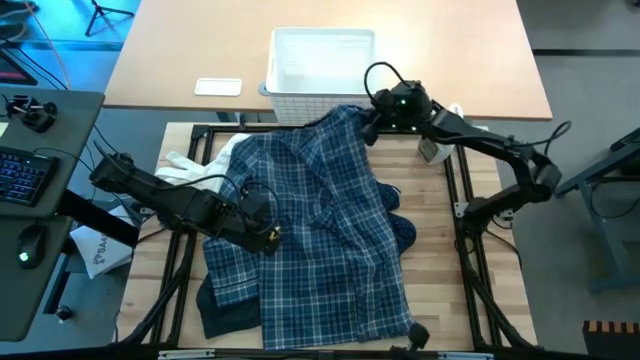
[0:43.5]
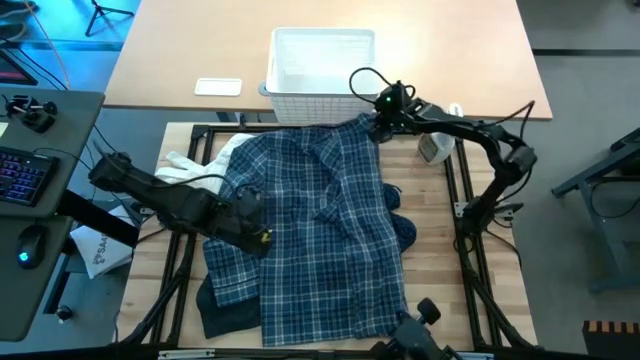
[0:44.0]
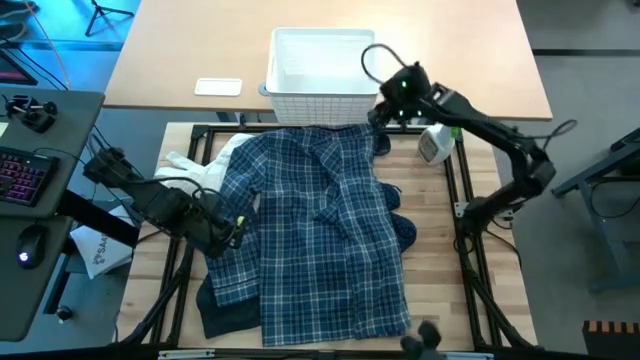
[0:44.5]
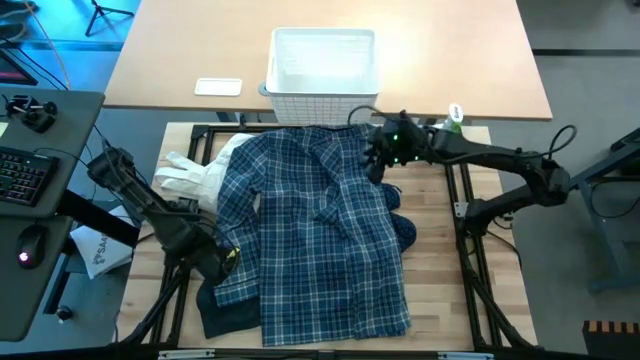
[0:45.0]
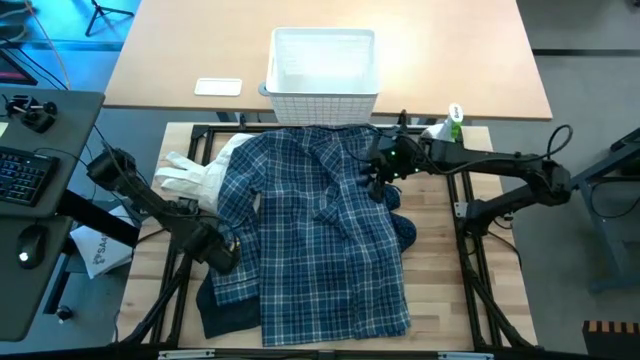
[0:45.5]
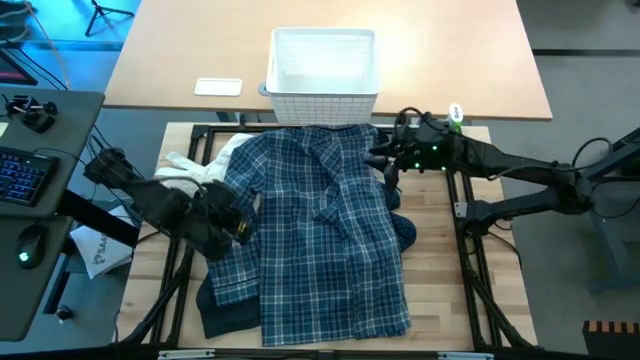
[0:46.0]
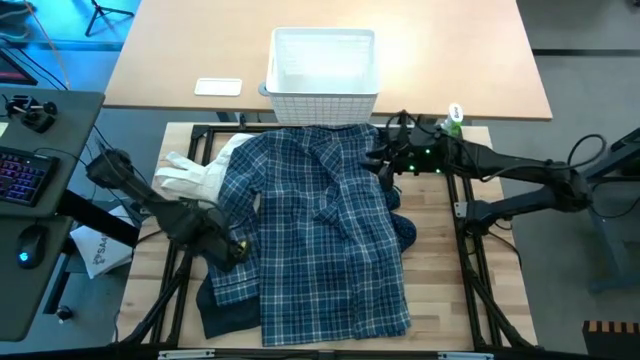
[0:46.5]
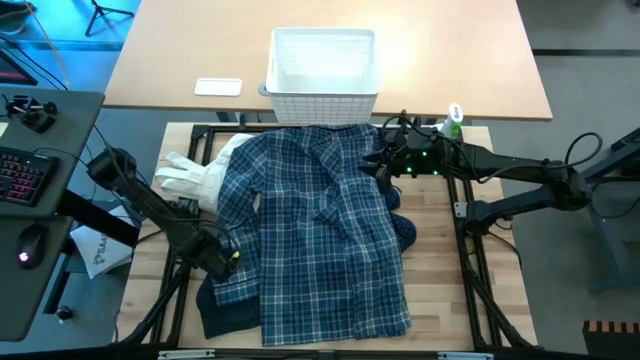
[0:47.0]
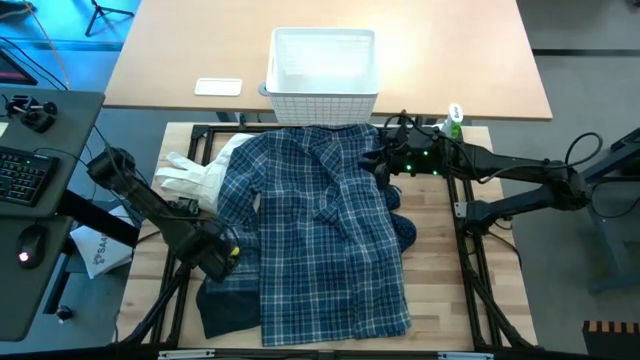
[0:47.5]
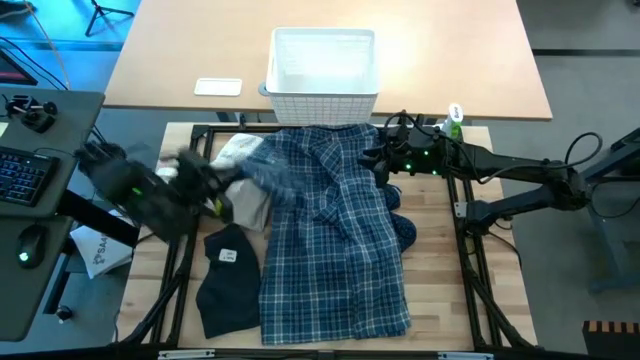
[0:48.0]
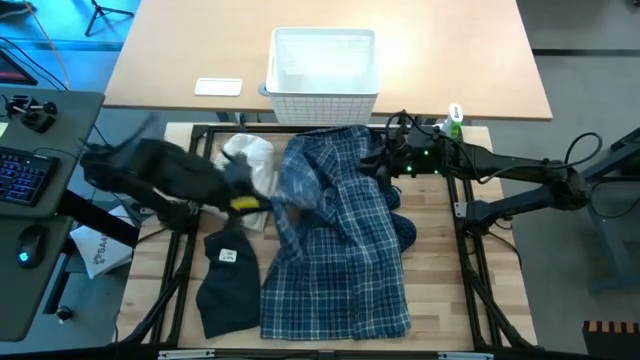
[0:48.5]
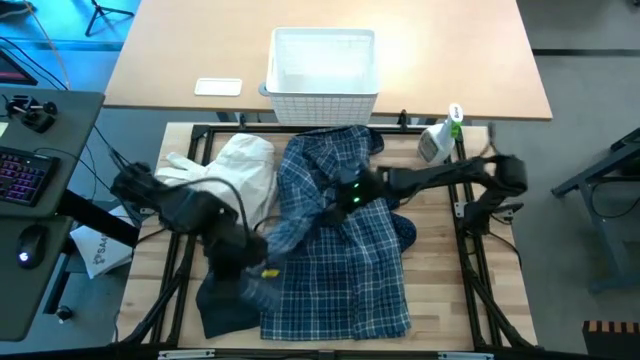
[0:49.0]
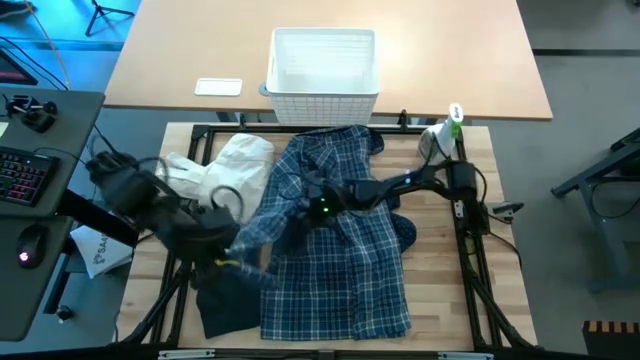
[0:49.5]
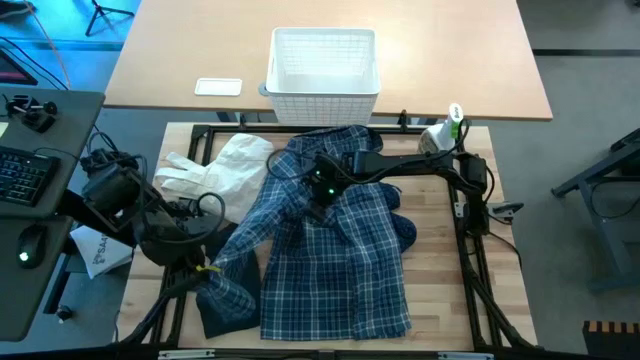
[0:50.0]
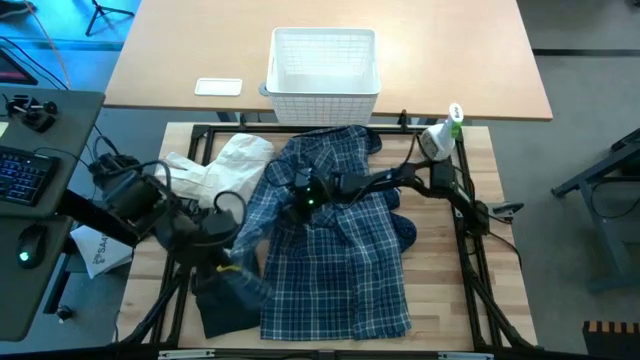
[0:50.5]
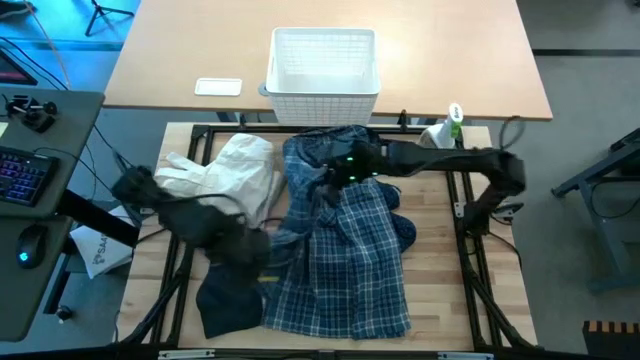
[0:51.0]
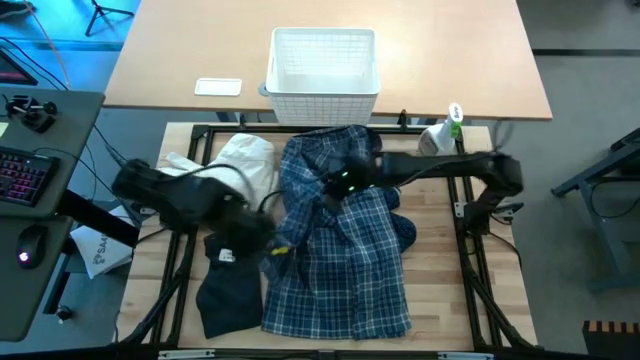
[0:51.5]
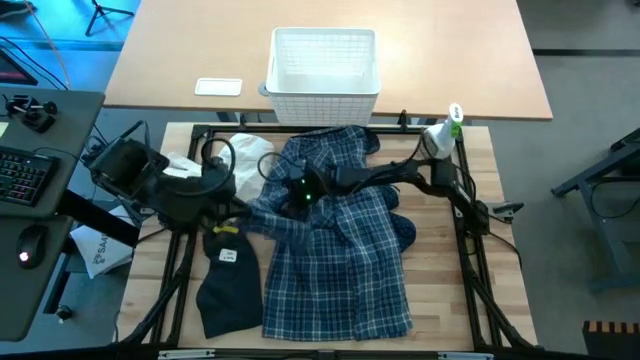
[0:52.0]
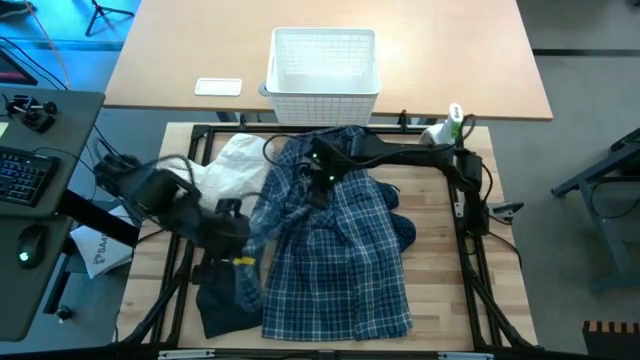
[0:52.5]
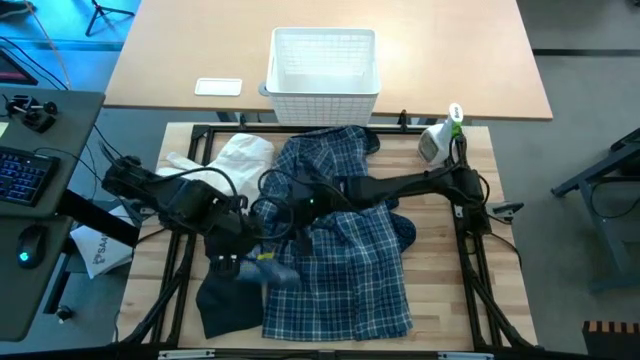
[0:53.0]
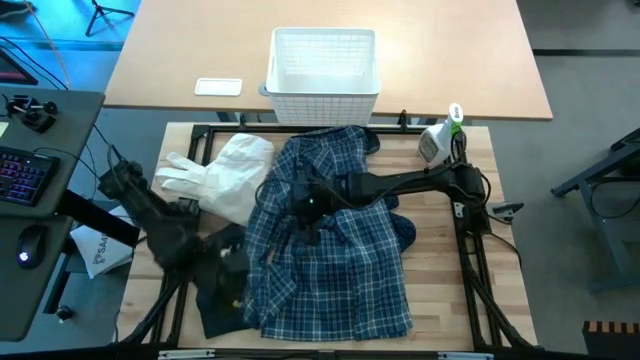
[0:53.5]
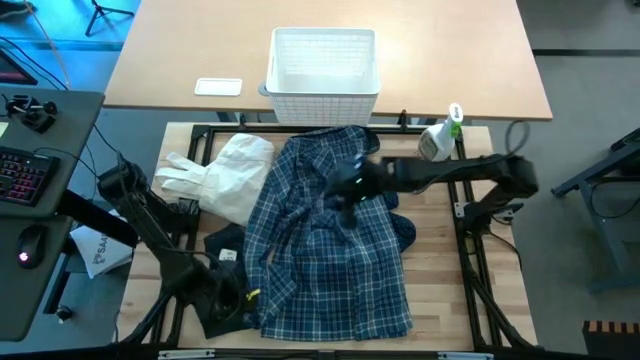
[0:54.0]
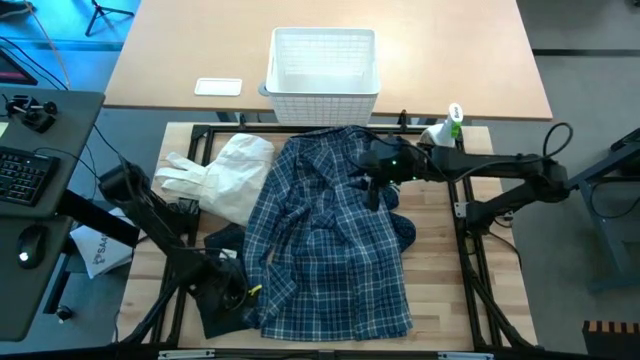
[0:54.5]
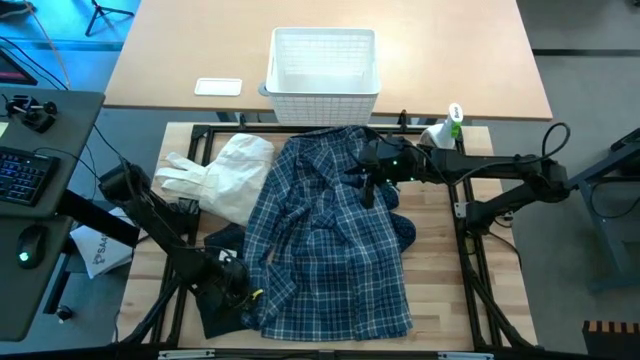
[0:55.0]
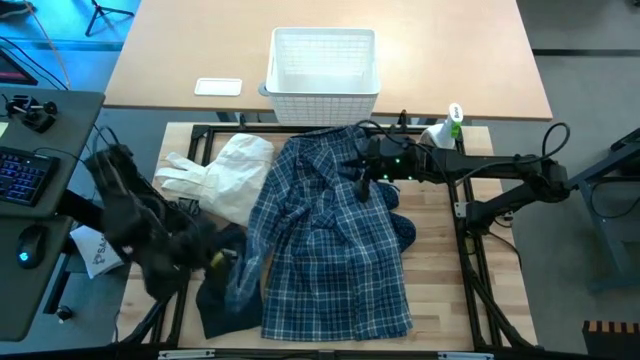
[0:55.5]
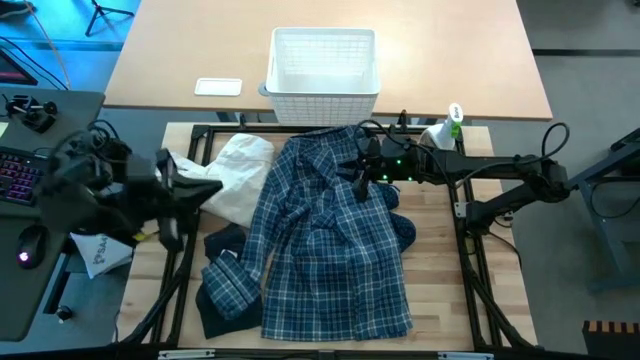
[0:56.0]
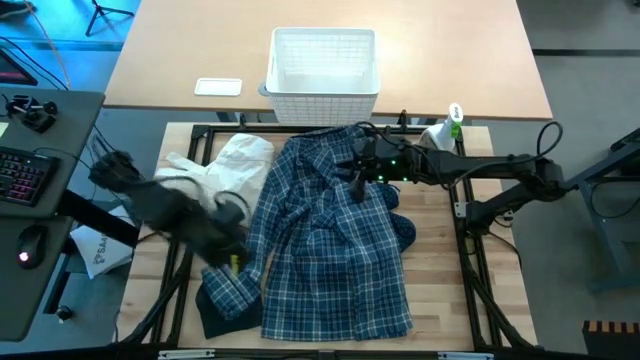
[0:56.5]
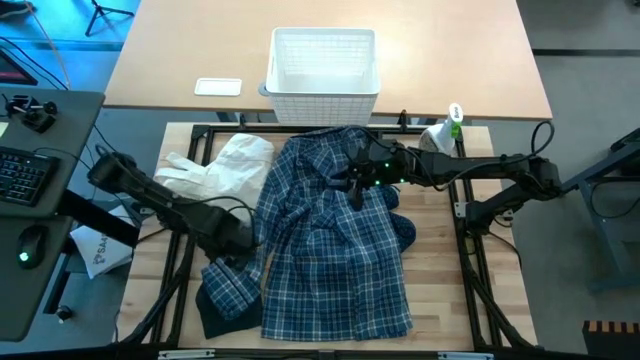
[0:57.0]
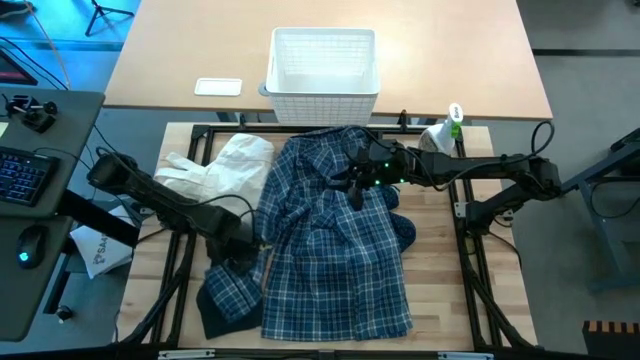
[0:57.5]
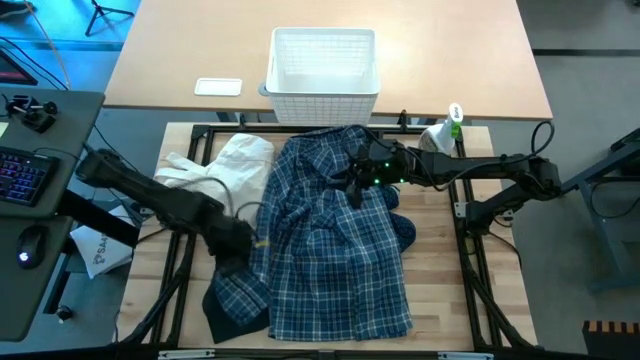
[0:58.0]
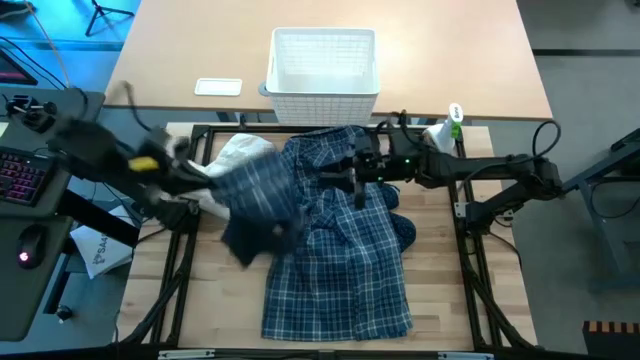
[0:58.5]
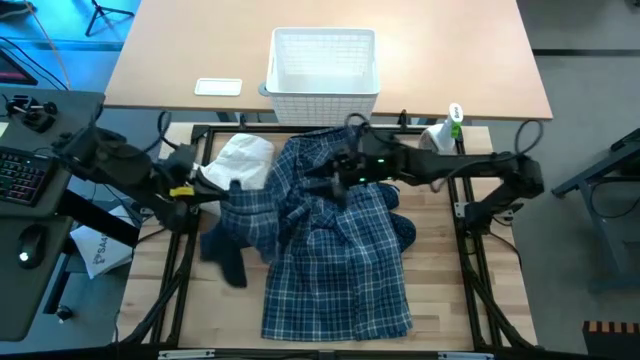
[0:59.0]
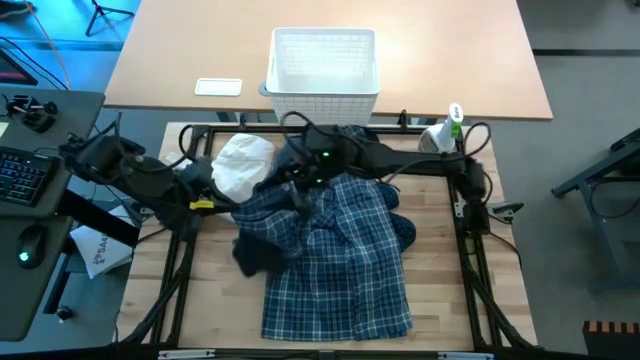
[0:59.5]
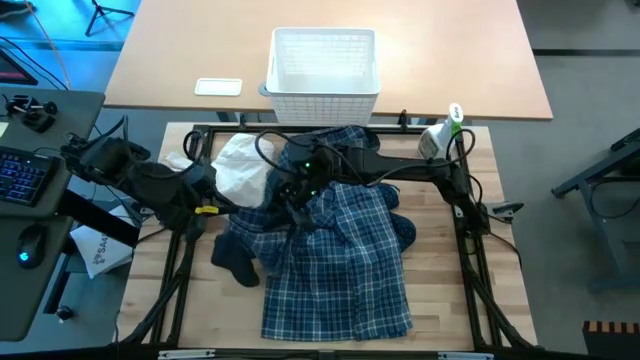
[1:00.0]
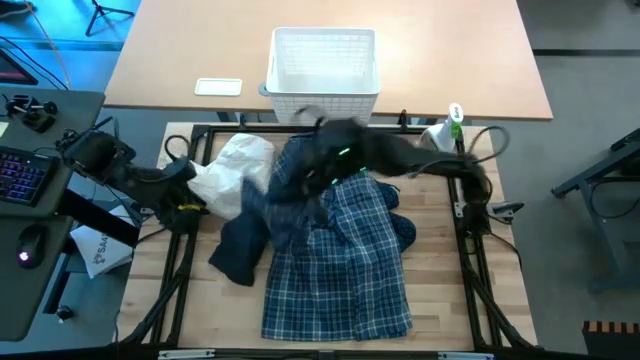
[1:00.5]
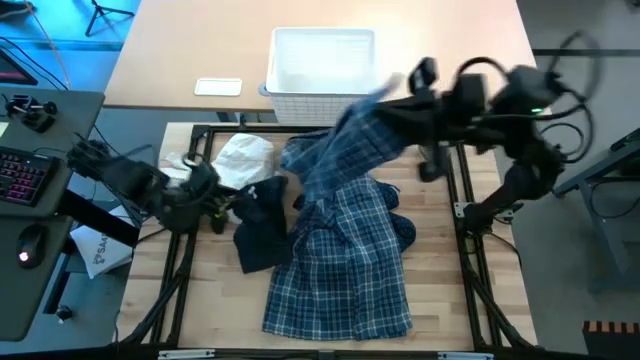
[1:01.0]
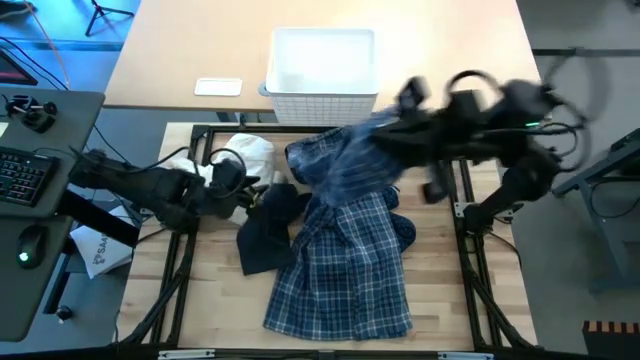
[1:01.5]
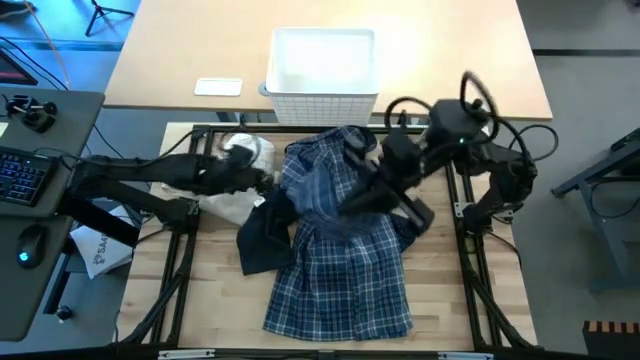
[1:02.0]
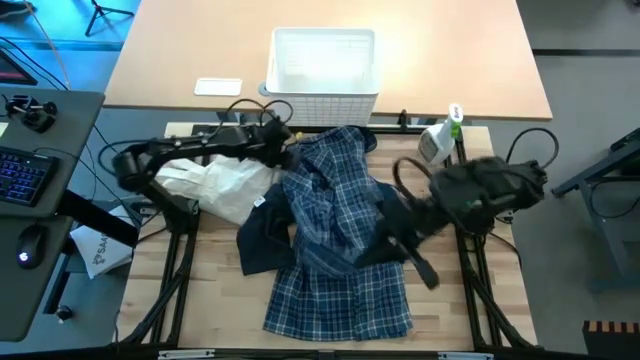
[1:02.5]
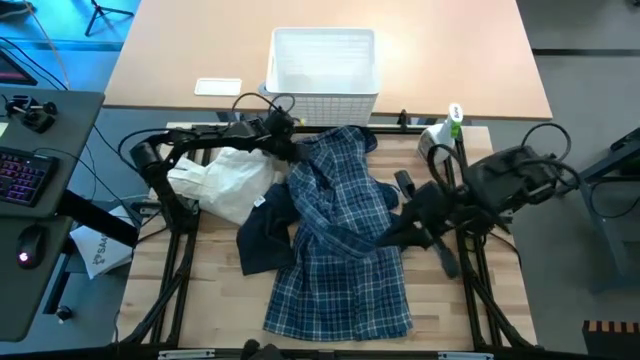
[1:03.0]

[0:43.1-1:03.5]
Task: Fold laundry
Fold the blue plaid flannel shirt

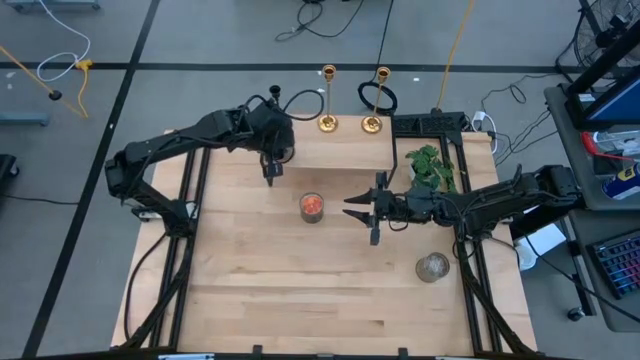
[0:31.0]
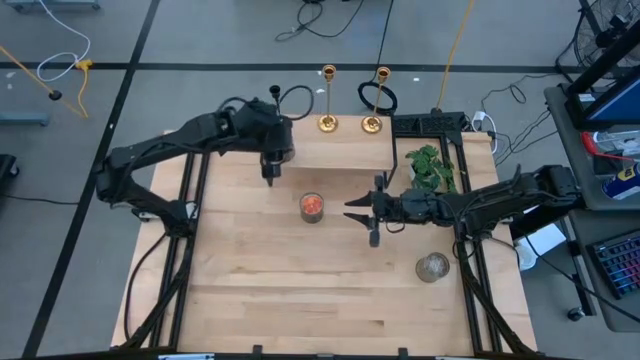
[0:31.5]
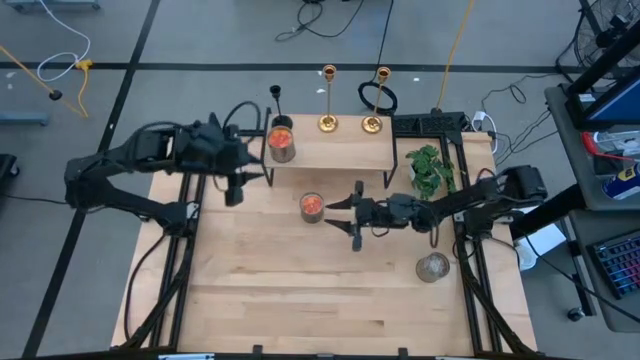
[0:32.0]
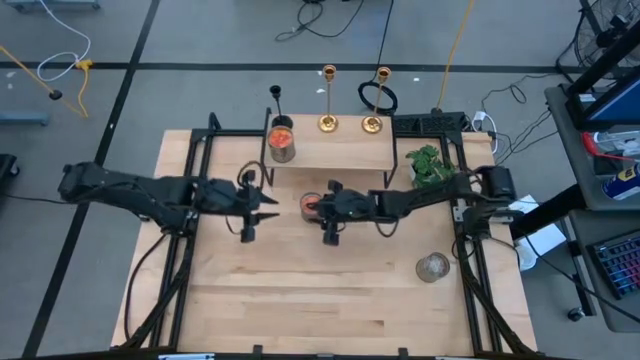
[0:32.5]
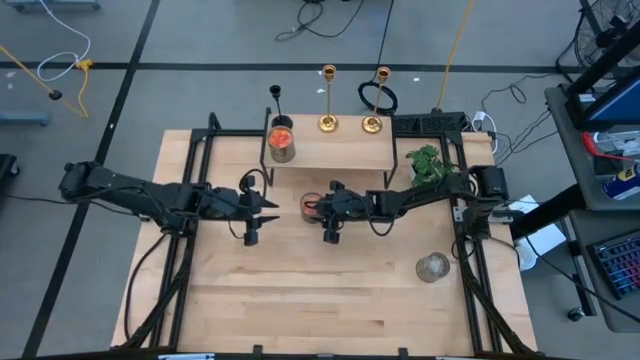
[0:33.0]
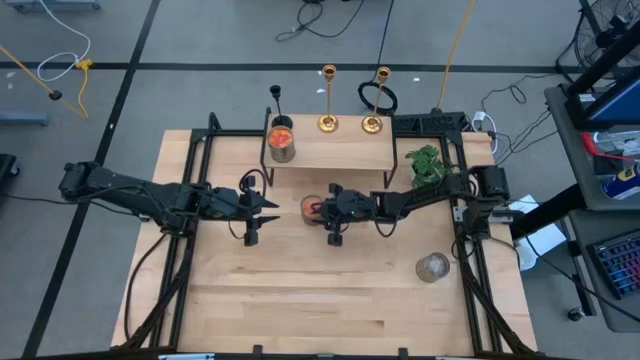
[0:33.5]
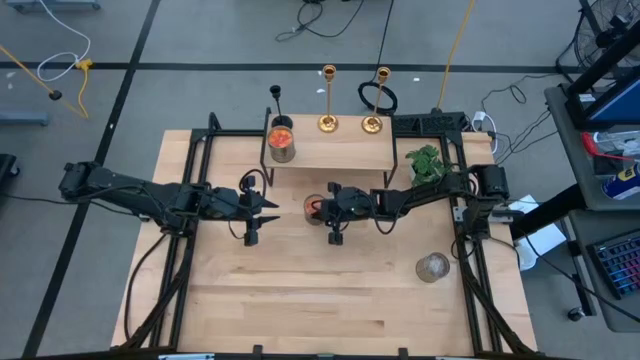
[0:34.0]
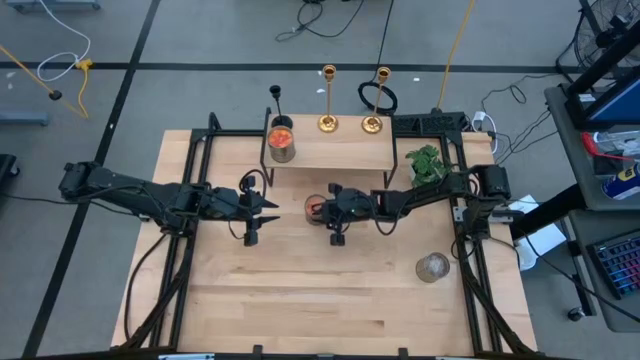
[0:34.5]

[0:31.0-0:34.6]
Task: Pick & Place candle stick holders
Put the orange scented candle on the shelf
